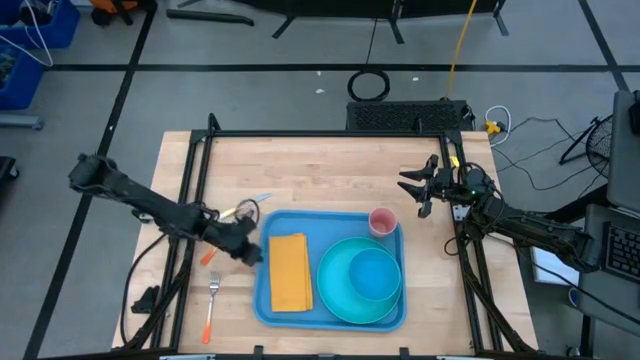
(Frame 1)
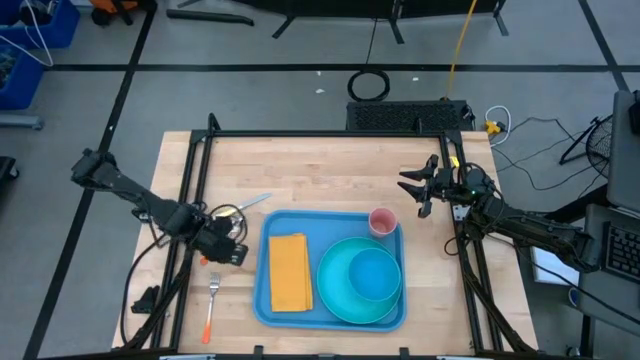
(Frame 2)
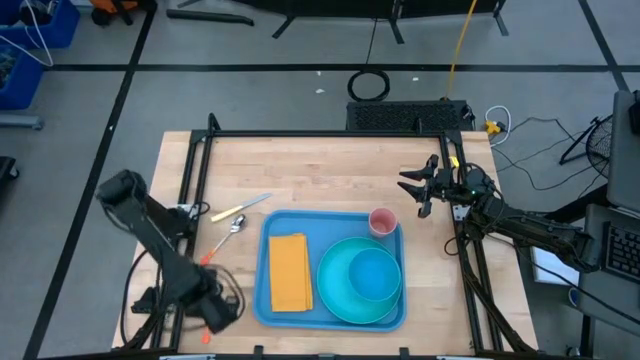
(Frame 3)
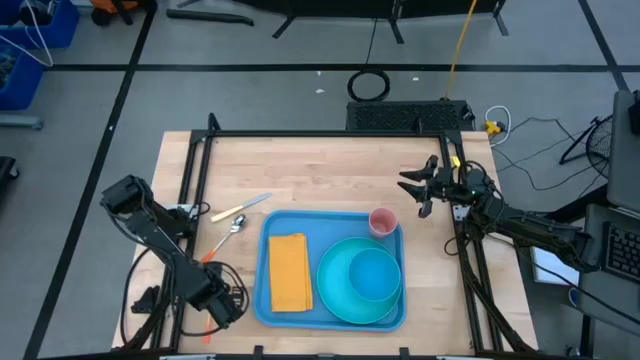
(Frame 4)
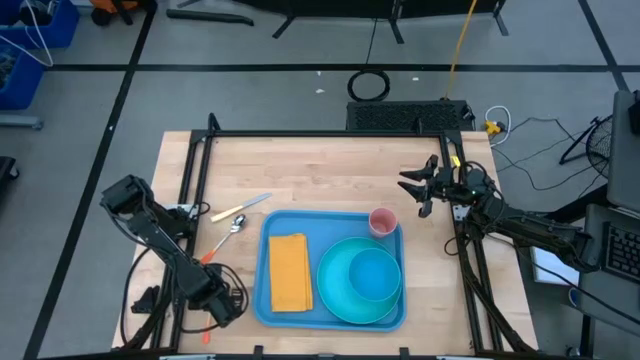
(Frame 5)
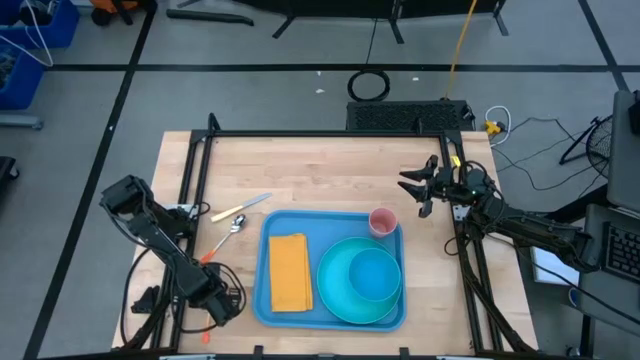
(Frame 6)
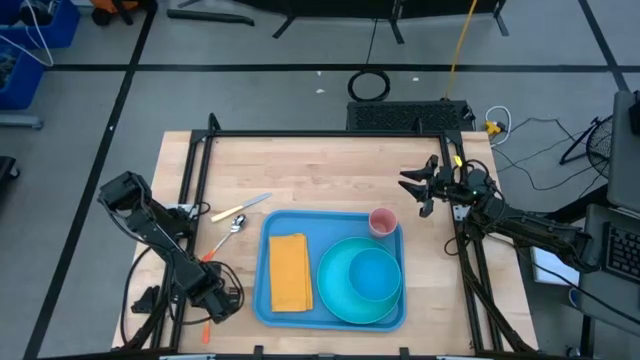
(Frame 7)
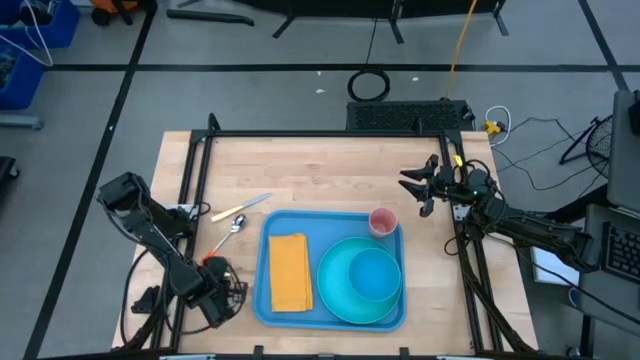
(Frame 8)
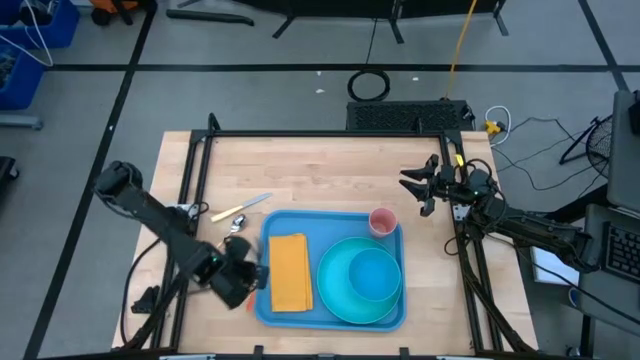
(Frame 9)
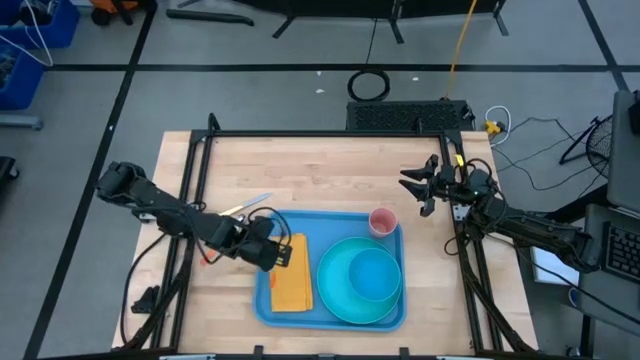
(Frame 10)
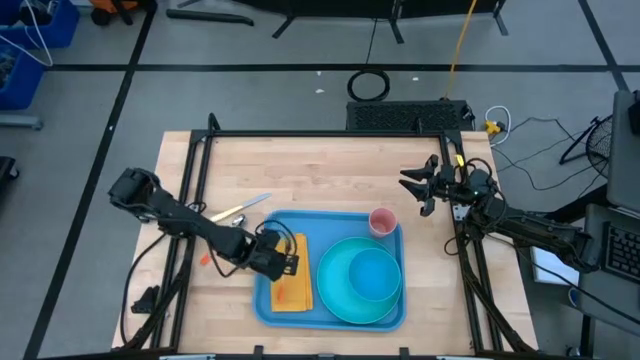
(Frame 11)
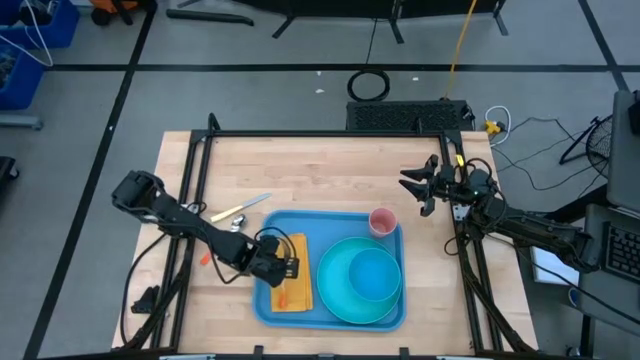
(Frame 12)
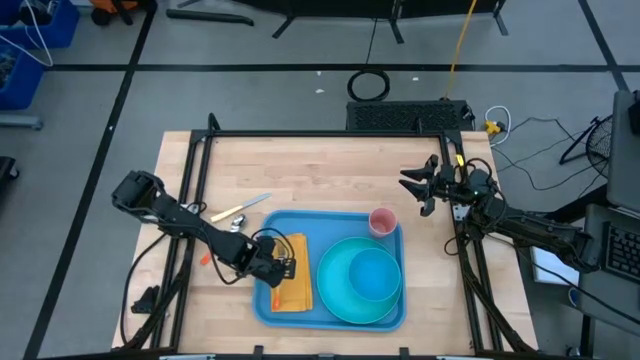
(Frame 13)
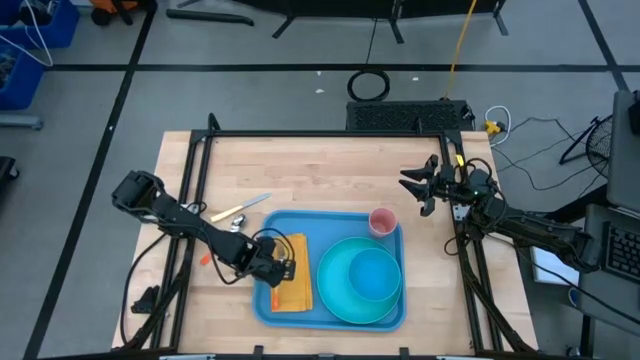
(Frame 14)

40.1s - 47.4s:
Task: Set up tray
Put the orange fork on the yellow napkin to the left of the green plate on the blue tray

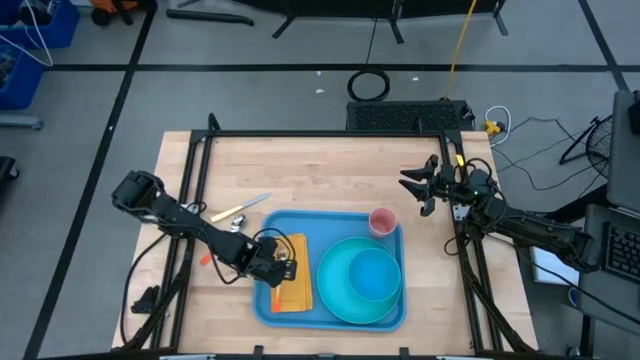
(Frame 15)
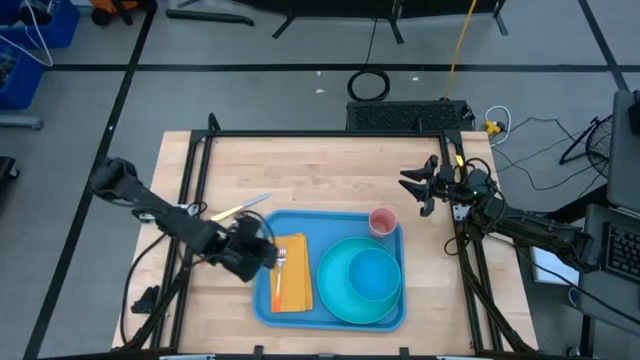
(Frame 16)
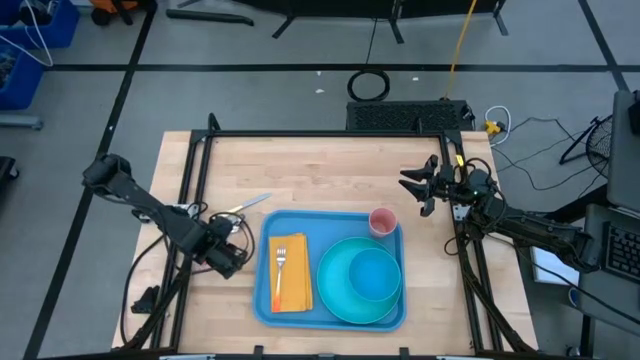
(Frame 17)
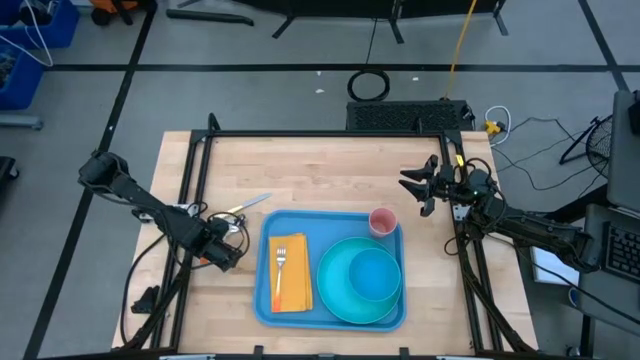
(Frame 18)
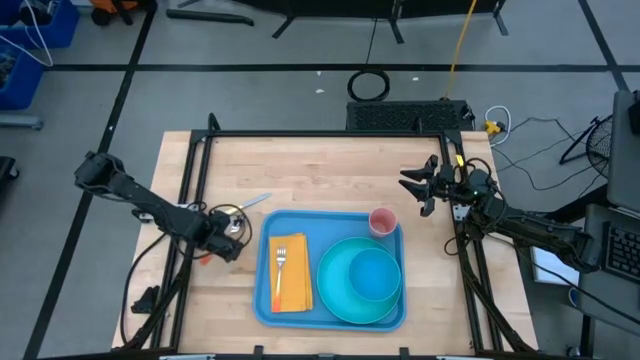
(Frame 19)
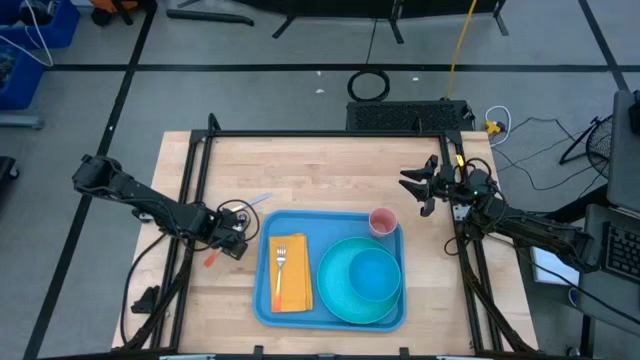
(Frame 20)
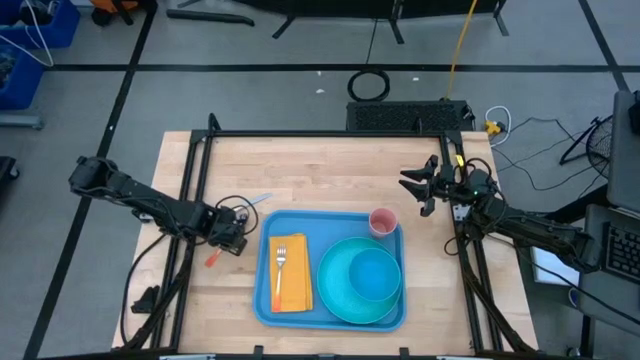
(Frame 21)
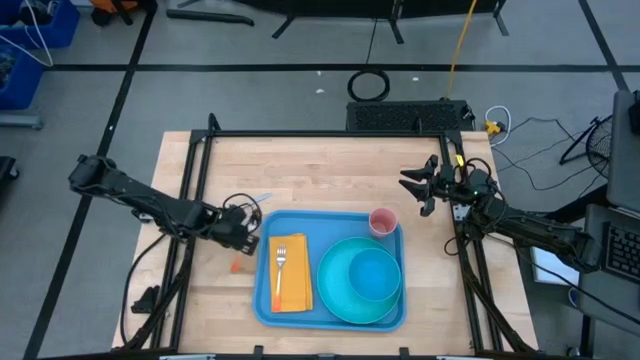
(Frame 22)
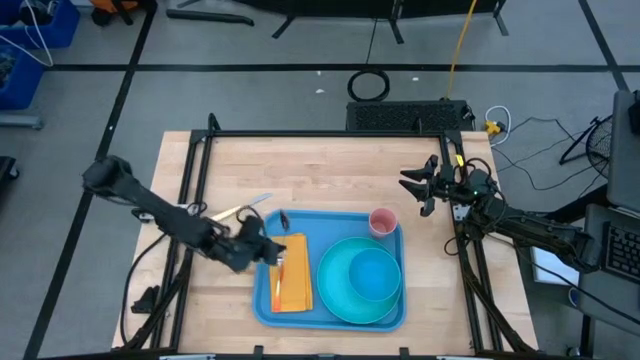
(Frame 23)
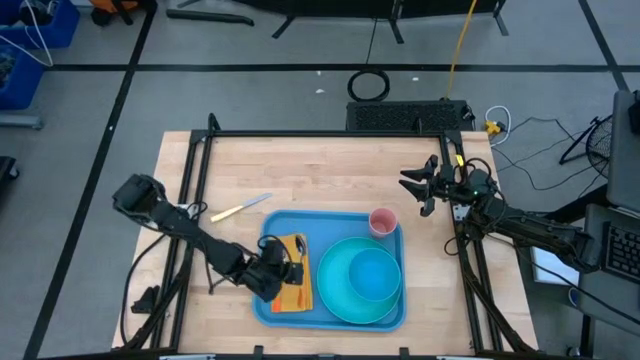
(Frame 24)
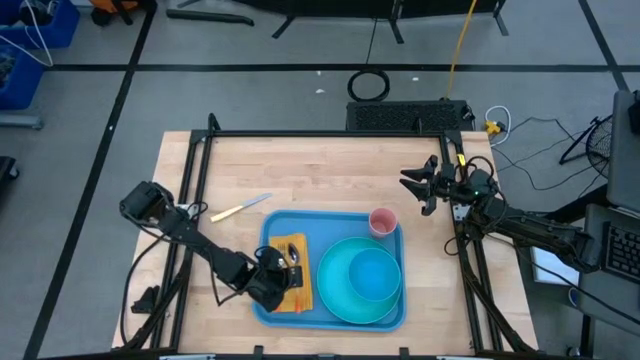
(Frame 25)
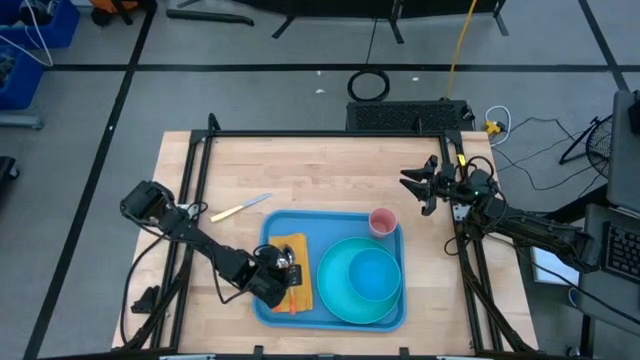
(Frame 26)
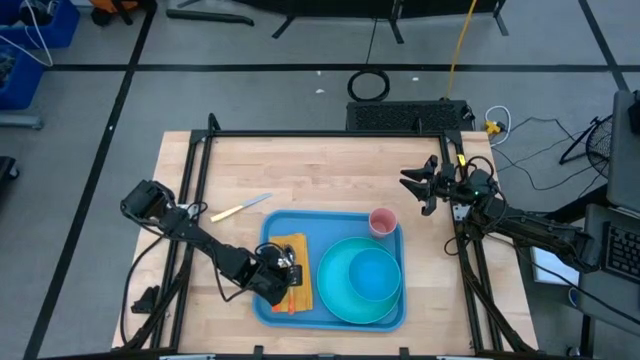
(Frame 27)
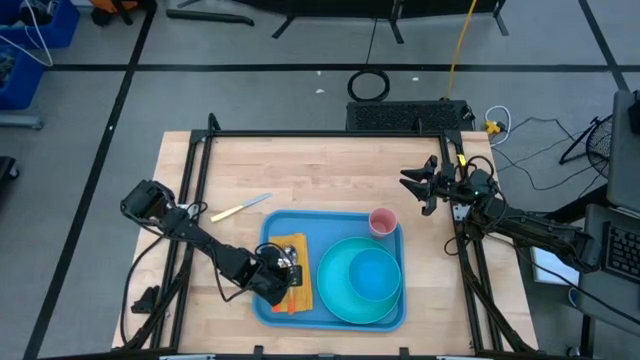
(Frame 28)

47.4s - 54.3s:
Put the orange spoon on the yellow napkin to the left of the orange fork on the blue tray

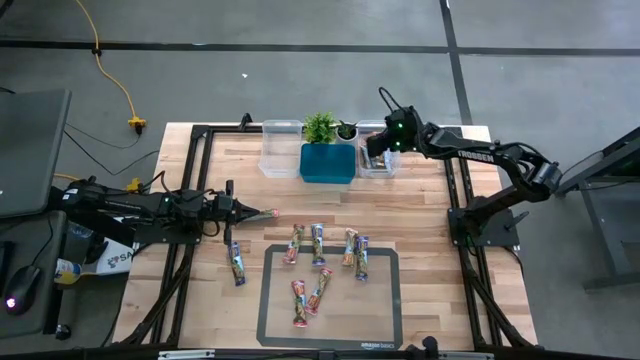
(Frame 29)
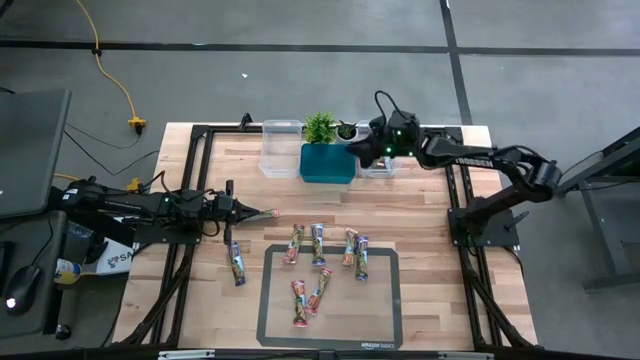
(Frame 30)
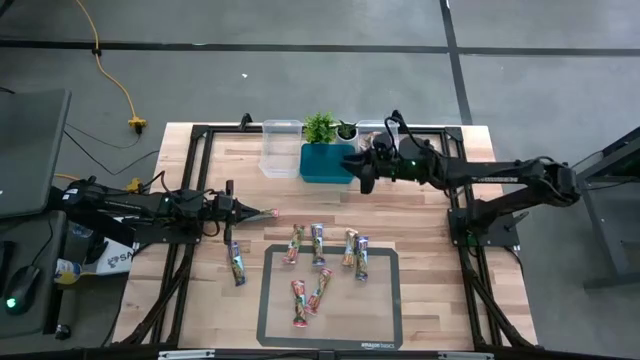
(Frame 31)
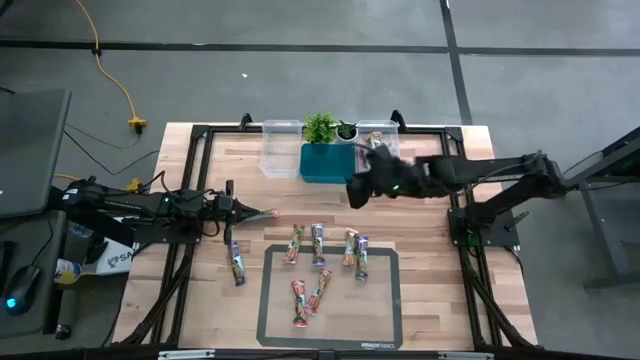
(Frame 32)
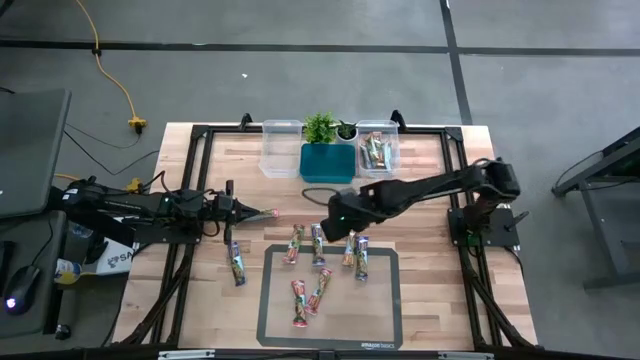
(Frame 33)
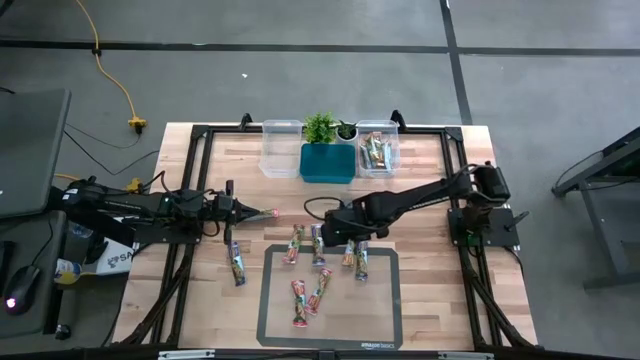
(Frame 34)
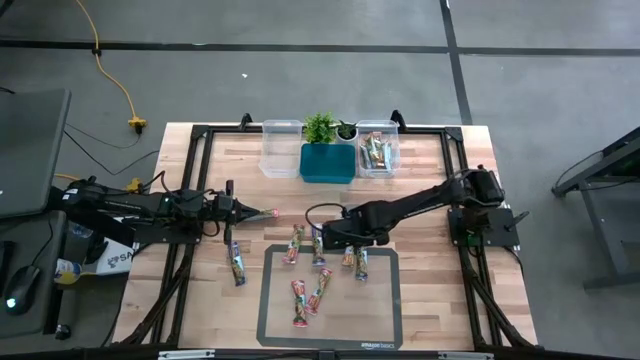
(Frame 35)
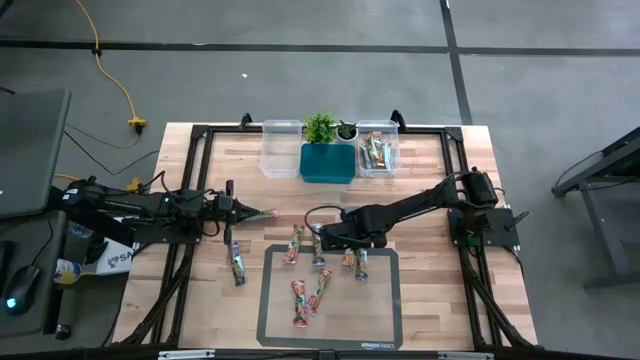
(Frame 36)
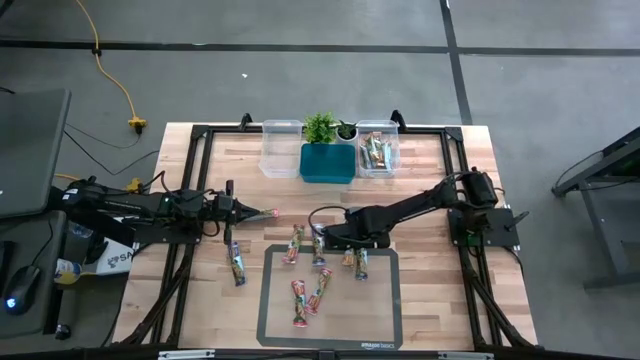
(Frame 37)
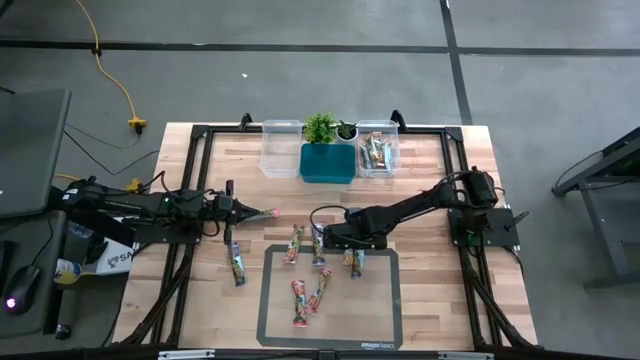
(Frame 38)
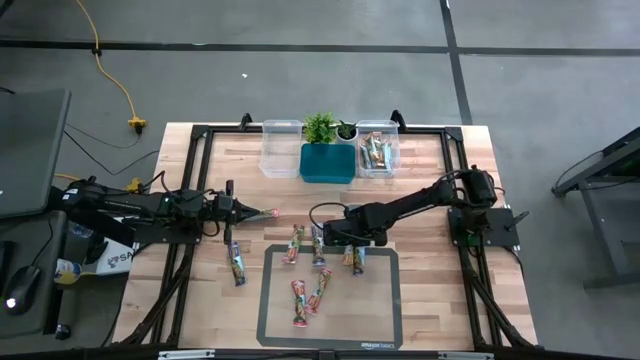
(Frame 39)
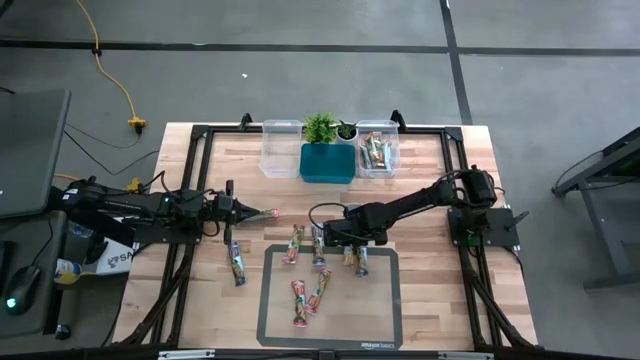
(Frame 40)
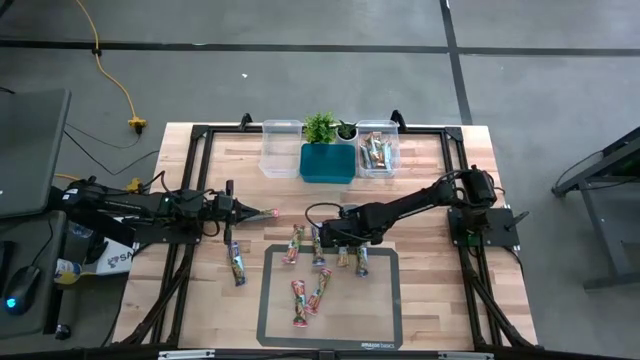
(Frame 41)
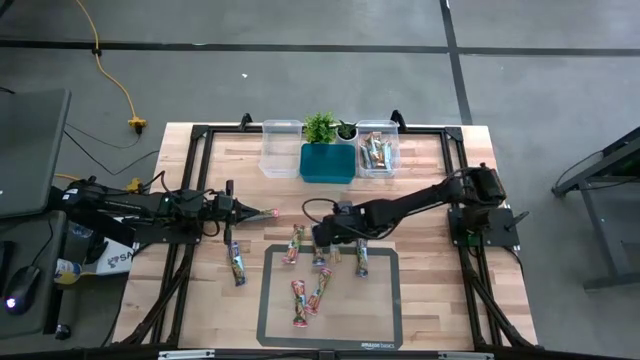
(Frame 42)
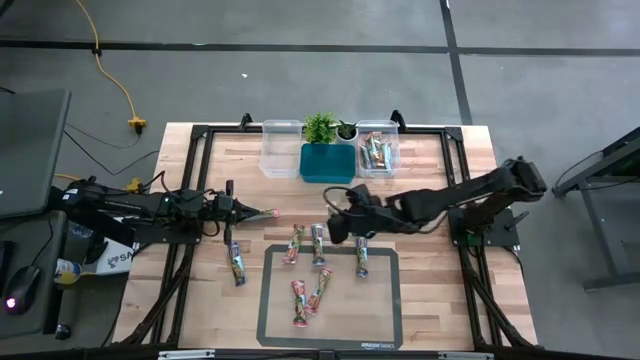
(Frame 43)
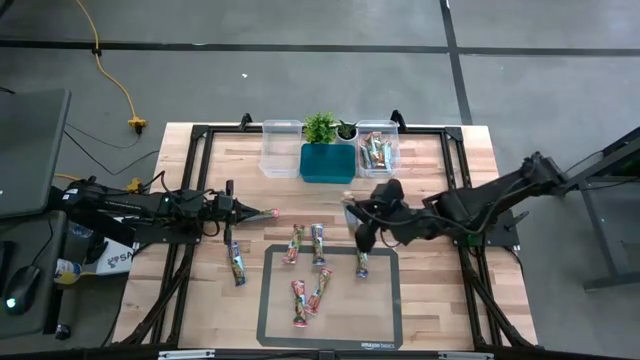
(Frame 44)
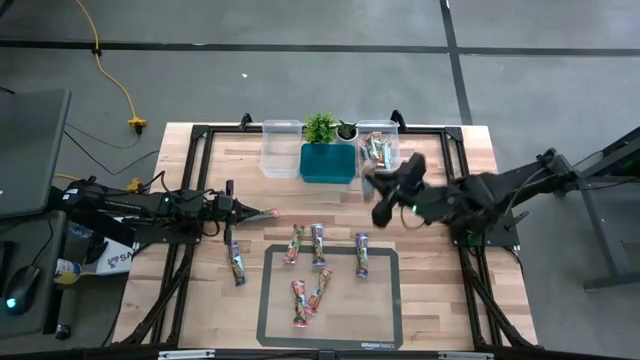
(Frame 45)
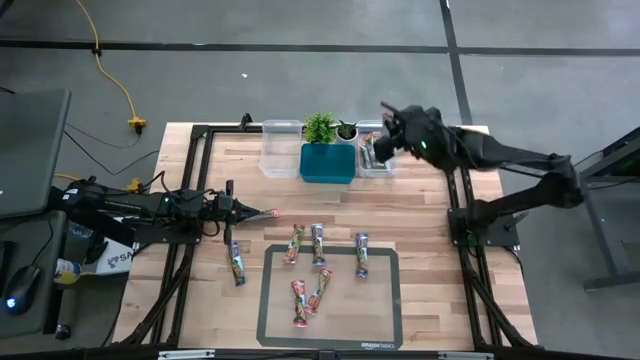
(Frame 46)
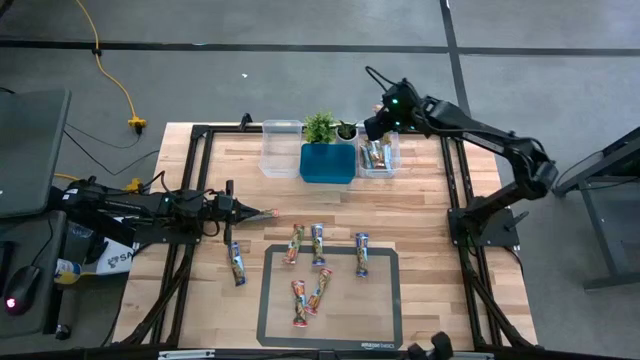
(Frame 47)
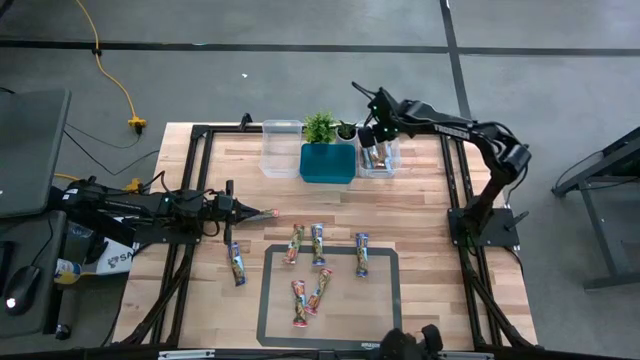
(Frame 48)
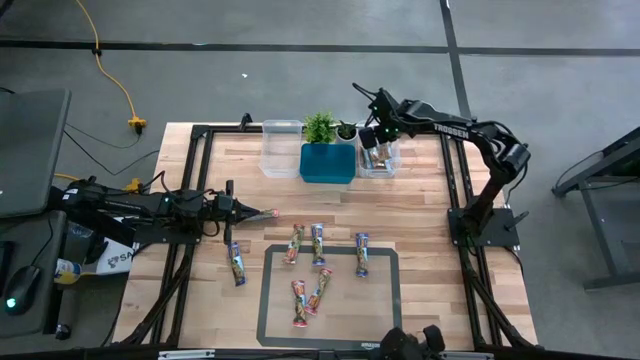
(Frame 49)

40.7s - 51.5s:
Task: Pick and place Granola Bars by type
Put the yellow granola bar into the right transparent bin
